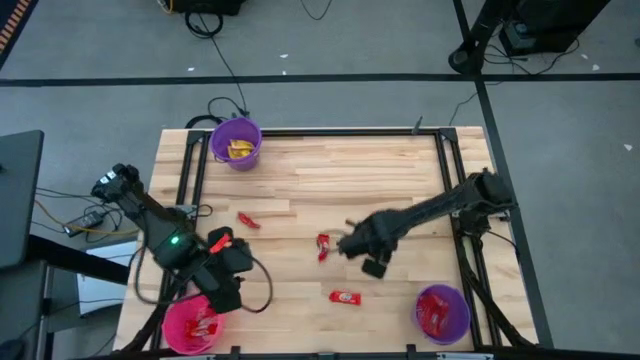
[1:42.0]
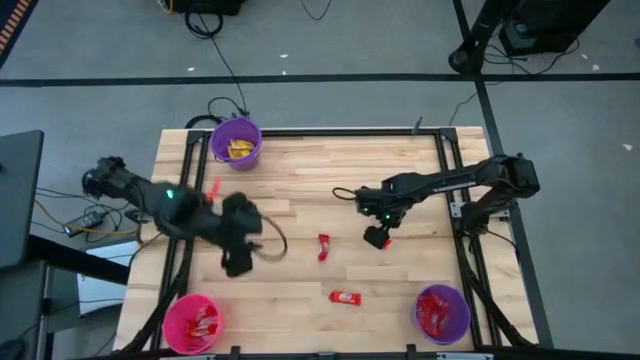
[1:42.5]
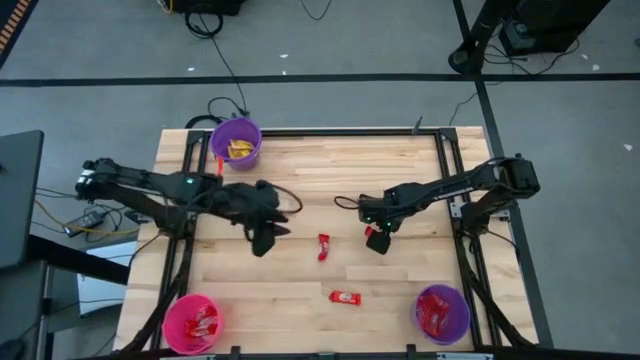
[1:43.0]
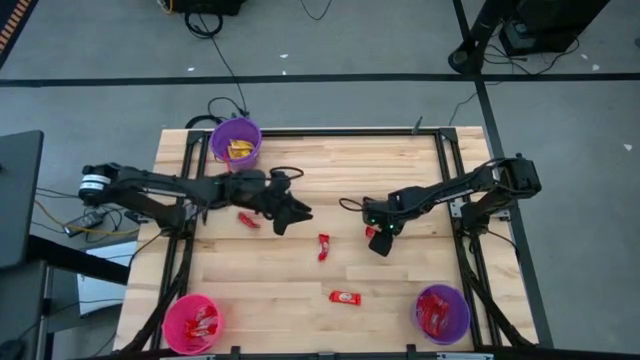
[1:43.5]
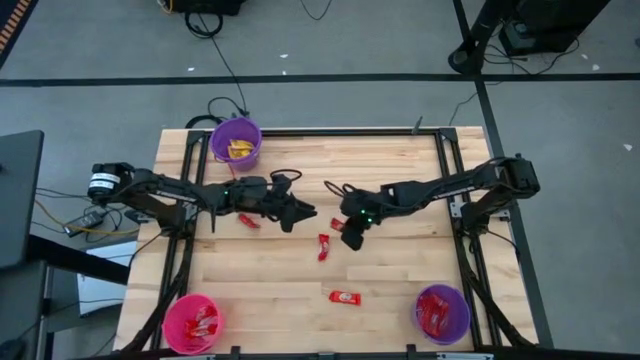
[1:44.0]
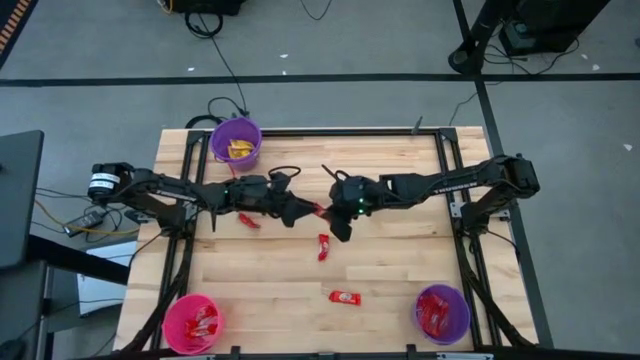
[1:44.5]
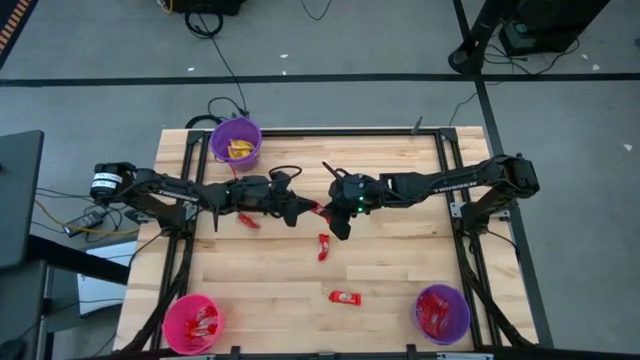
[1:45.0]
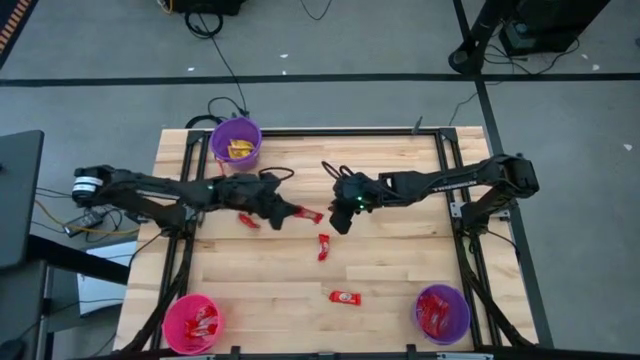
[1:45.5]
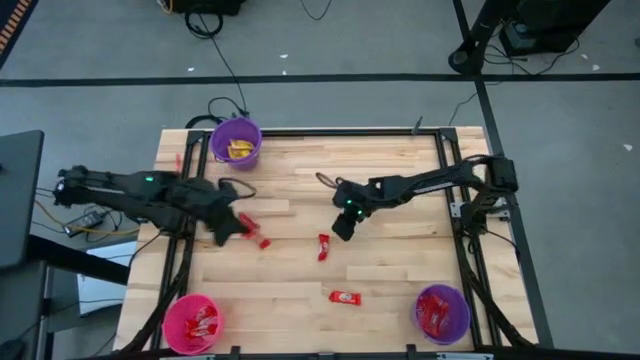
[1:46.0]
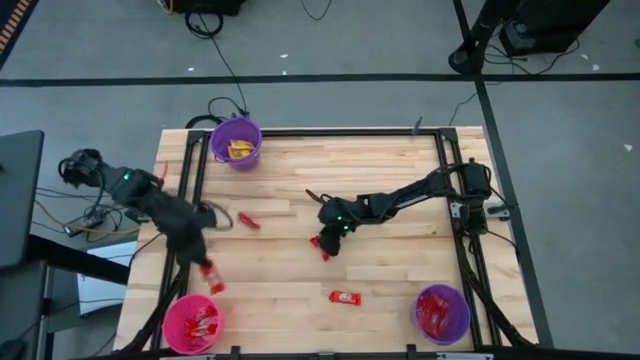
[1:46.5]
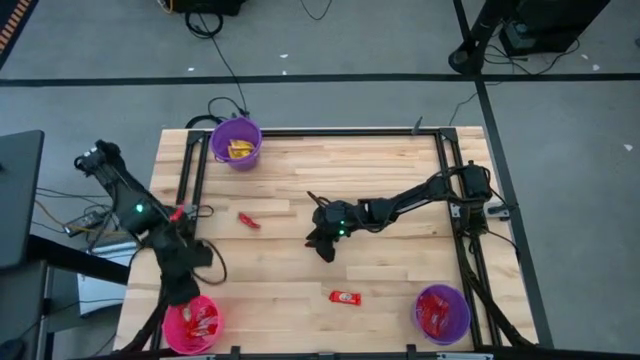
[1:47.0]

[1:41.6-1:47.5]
Task: Sort candy by brand, put in halloween buckets
Put the red chocolate into the pink bucket

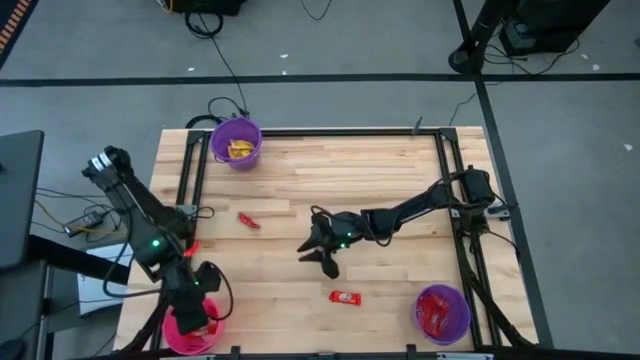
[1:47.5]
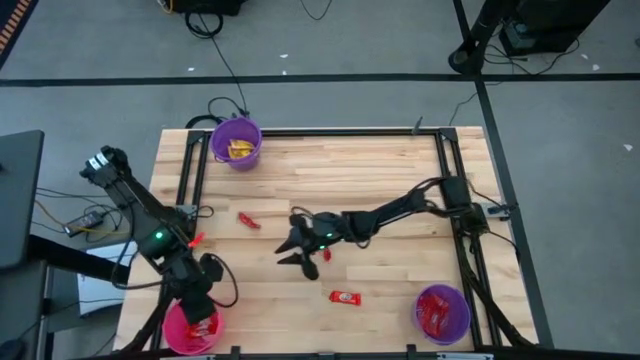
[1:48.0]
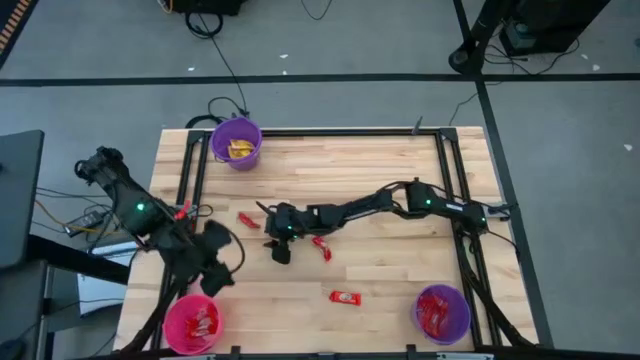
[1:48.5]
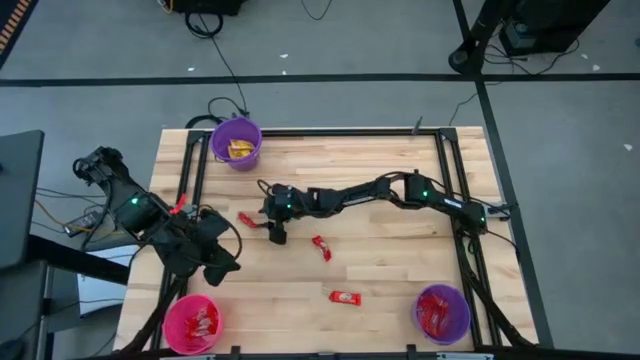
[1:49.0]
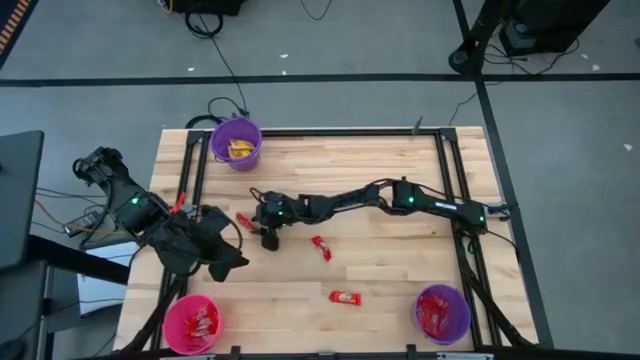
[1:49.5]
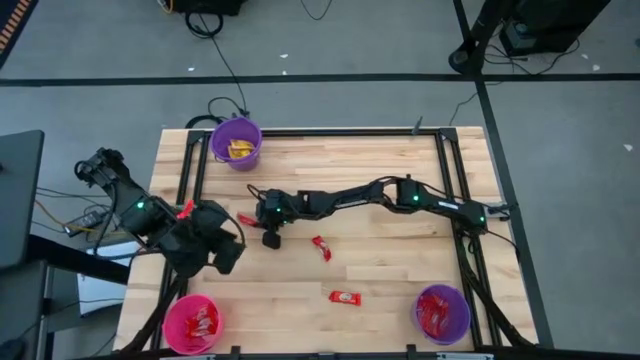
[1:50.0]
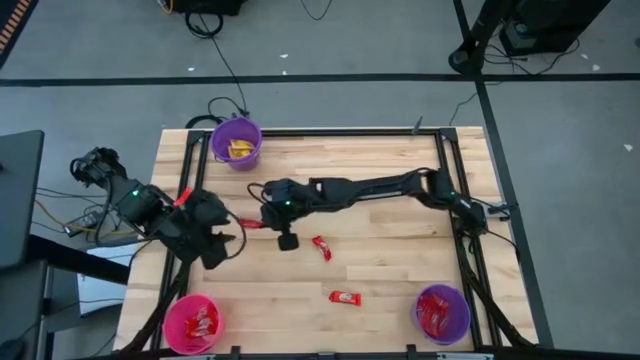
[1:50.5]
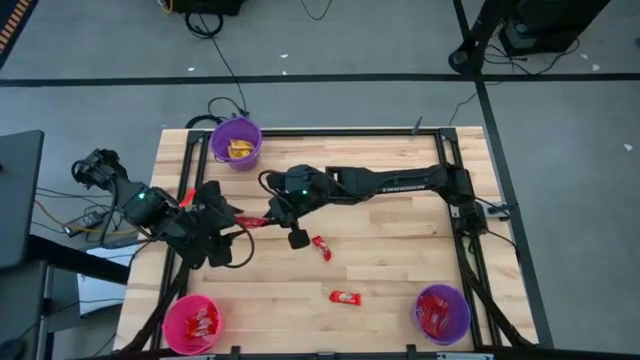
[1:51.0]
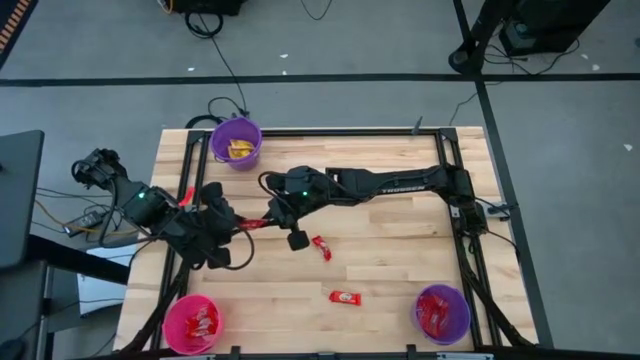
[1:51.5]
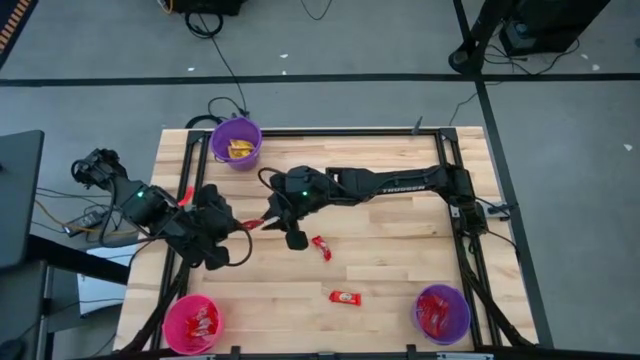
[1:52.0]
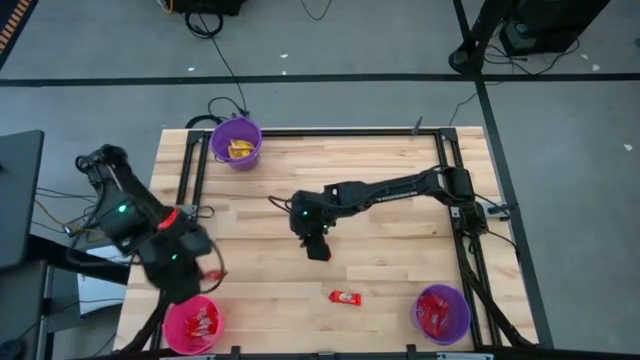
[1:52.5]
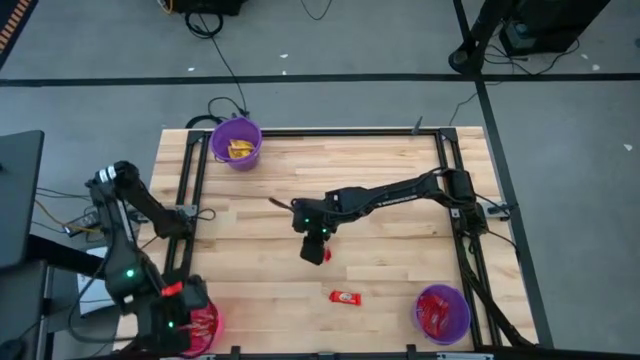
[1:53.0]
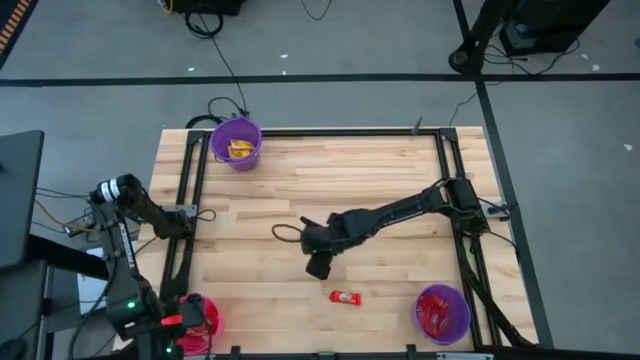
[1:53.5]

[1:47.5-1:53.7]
Put the red chocolate into the pink bucket

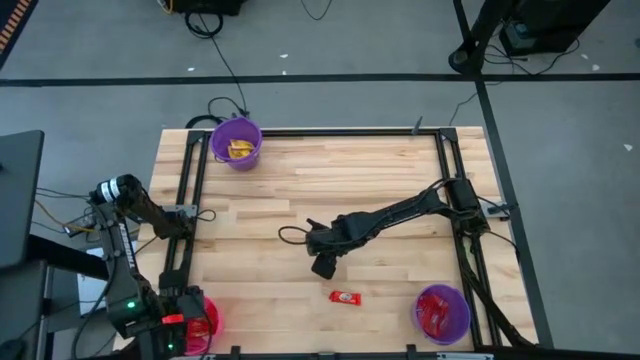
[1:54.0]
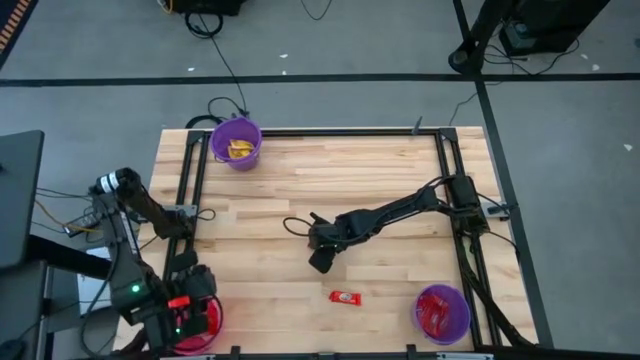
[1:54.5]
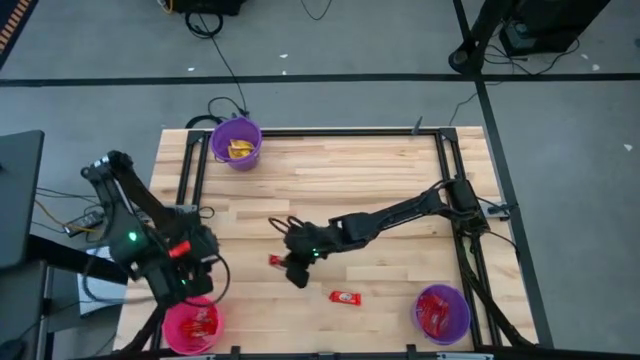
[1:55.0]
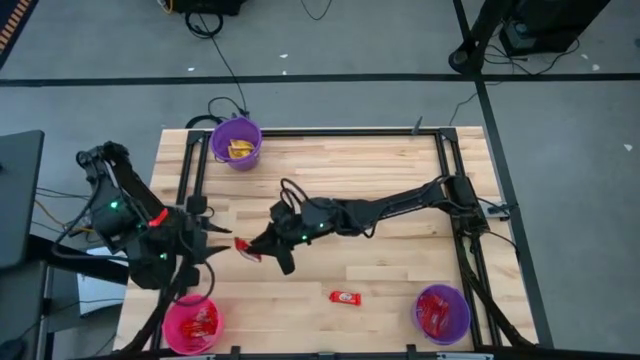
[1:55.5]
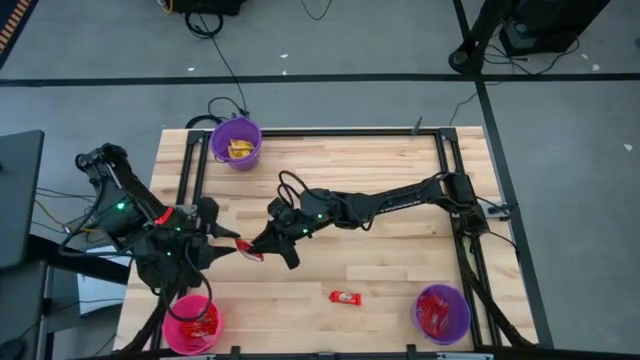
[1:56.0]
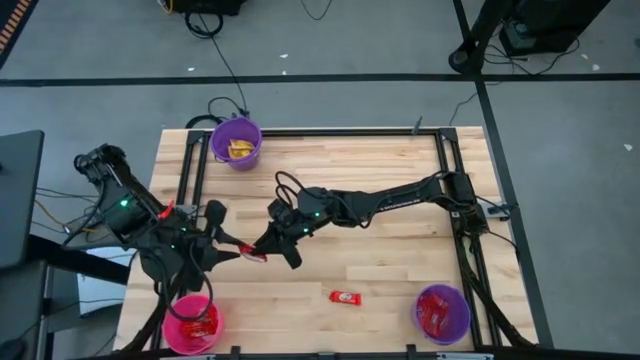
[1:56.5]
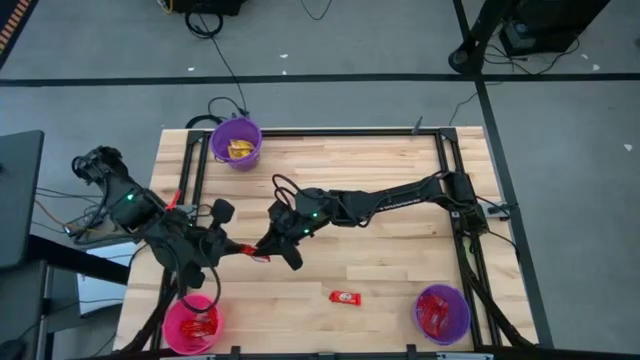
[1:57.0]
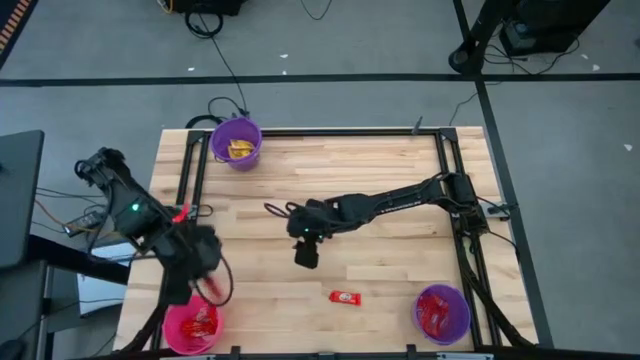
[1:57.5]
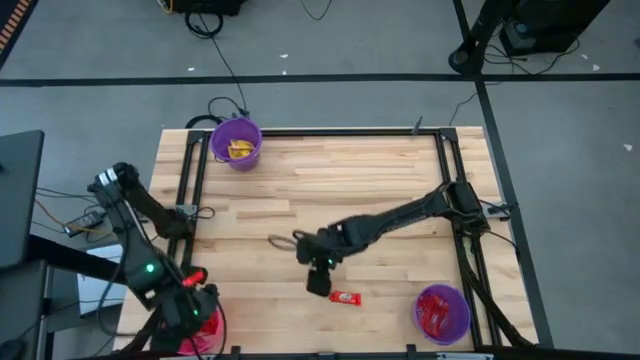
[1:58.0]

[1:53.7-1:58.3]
Put the red chocolate into the pink bucket

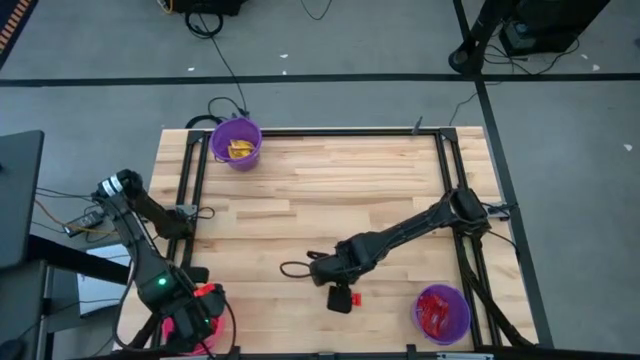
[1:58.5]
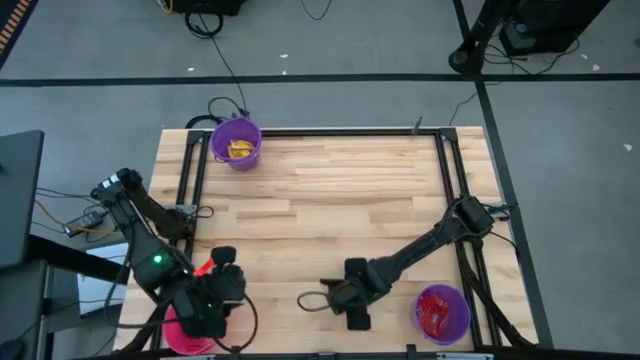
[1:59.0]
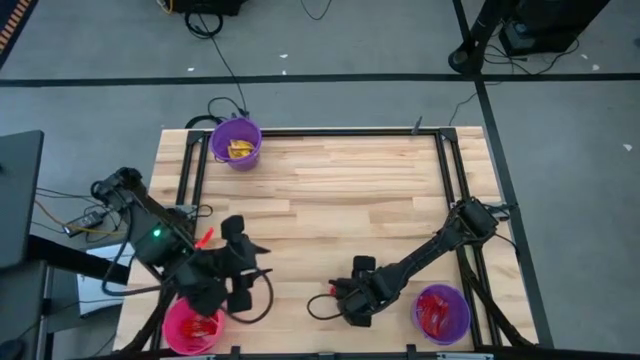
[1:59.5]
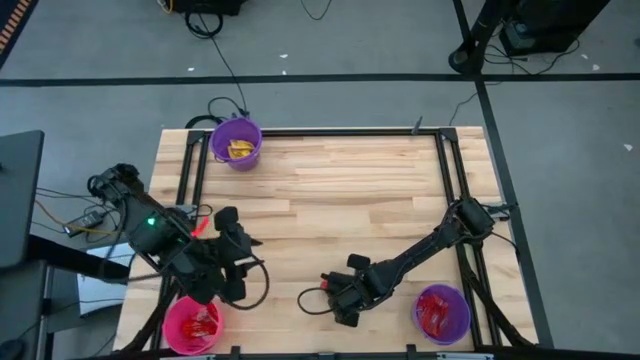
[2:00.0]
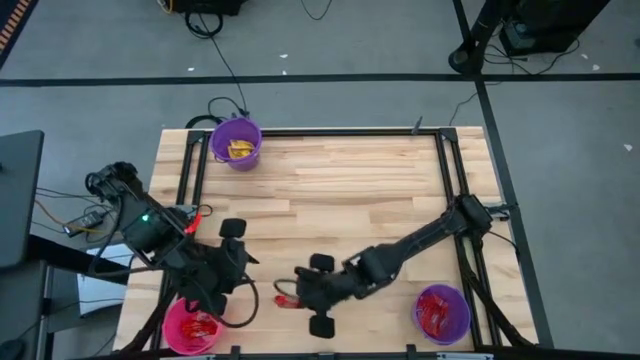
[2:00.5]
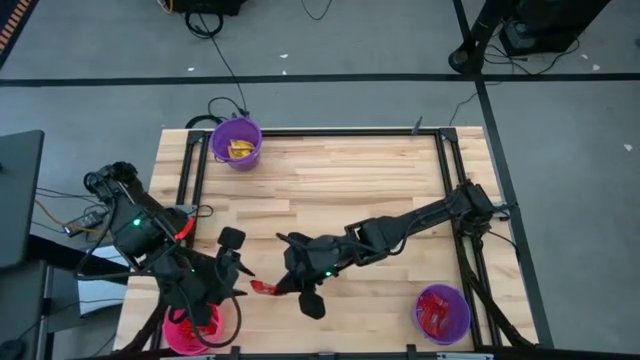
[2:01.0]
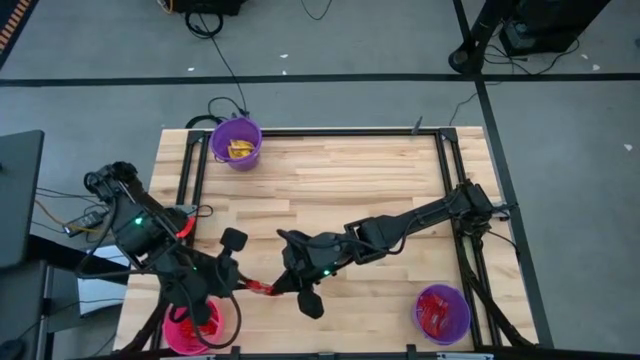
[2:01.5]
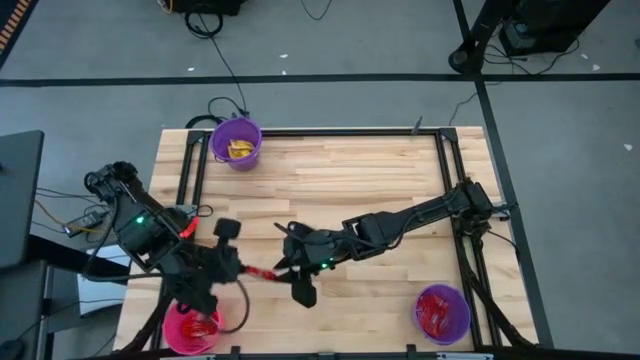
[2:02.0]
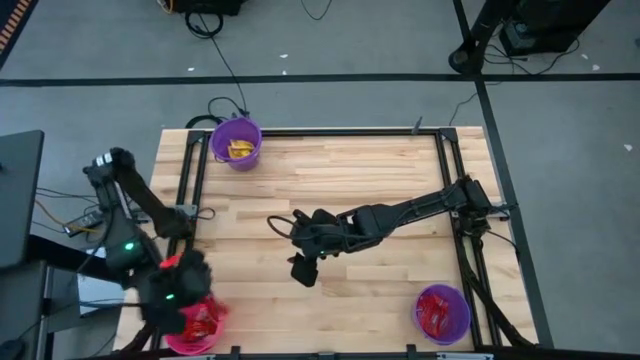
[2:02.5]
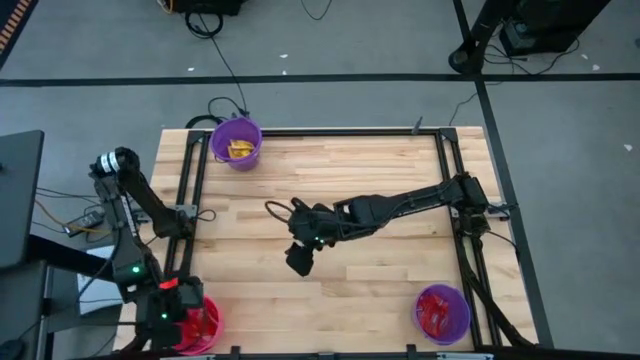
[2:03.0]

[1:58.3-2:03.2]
Put the red chocolate into the pink bucket
